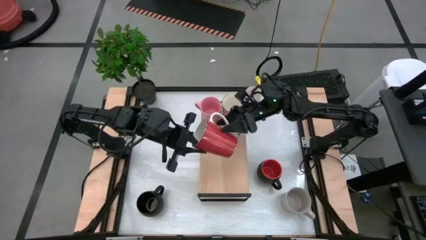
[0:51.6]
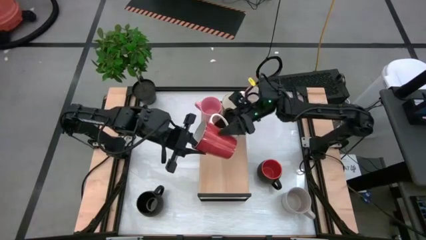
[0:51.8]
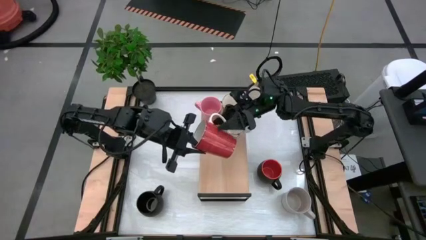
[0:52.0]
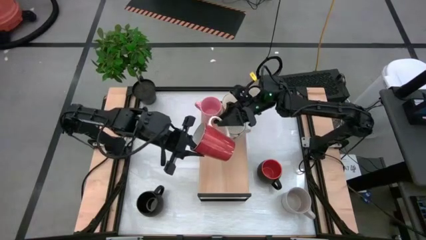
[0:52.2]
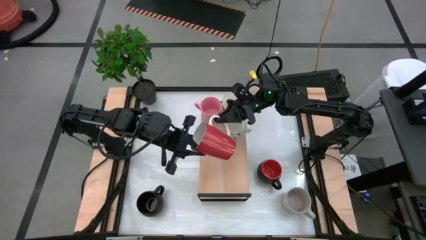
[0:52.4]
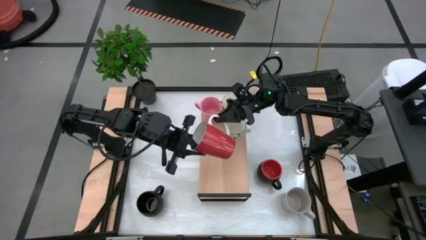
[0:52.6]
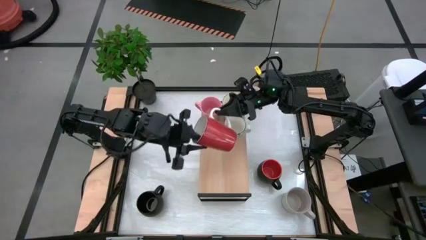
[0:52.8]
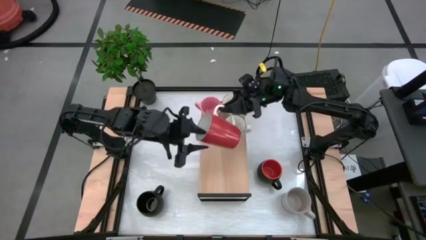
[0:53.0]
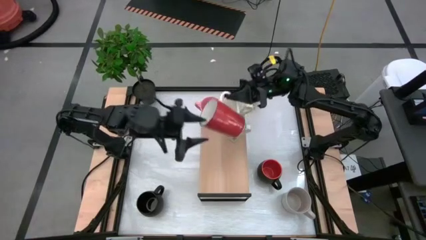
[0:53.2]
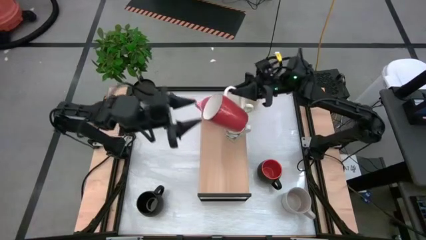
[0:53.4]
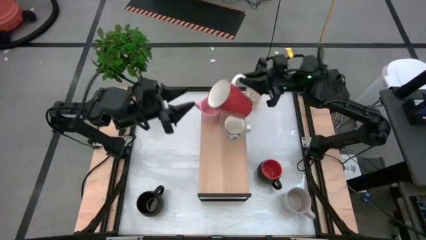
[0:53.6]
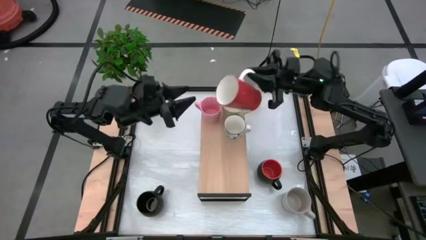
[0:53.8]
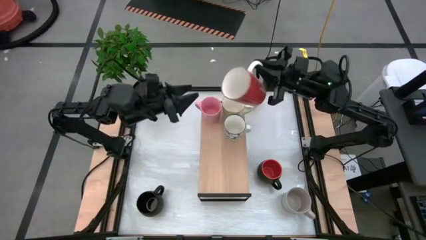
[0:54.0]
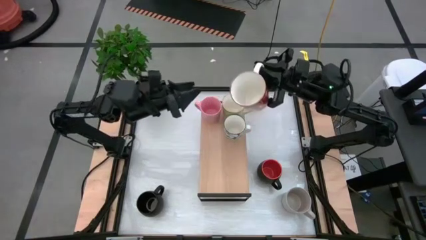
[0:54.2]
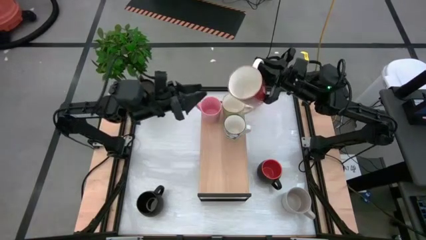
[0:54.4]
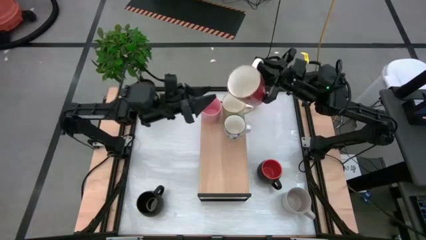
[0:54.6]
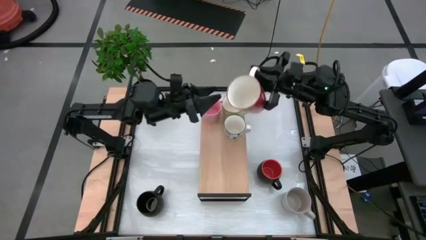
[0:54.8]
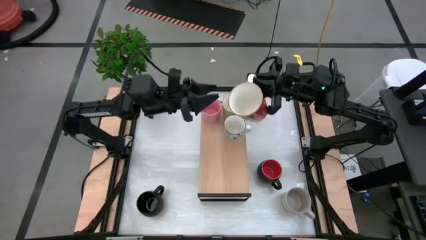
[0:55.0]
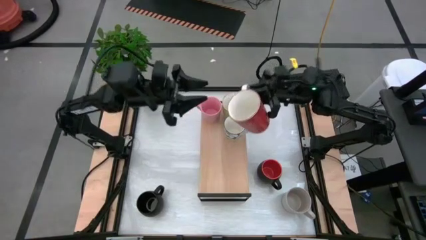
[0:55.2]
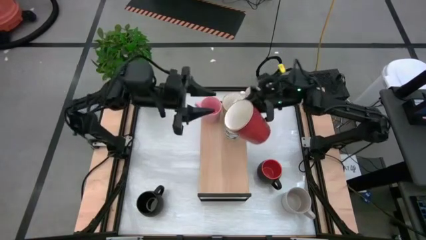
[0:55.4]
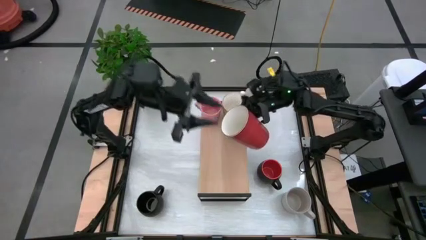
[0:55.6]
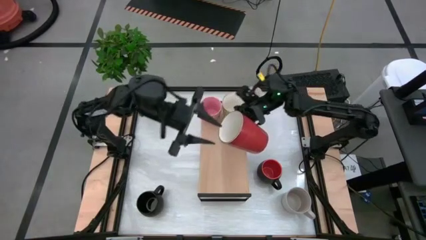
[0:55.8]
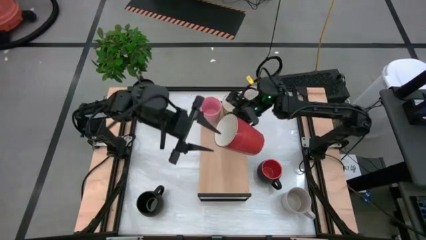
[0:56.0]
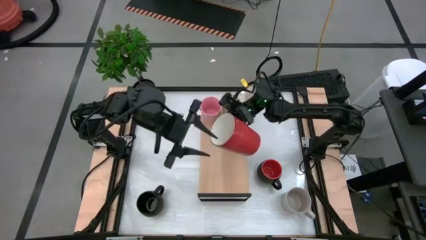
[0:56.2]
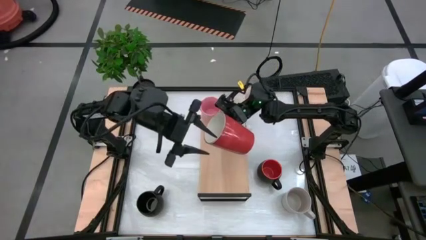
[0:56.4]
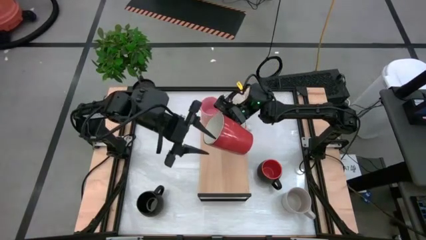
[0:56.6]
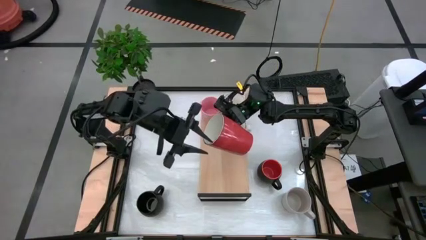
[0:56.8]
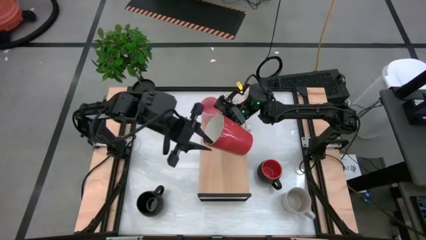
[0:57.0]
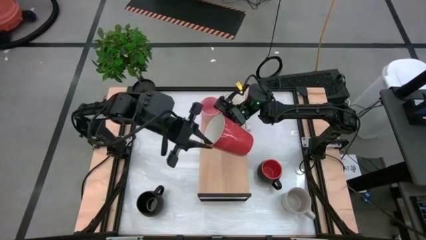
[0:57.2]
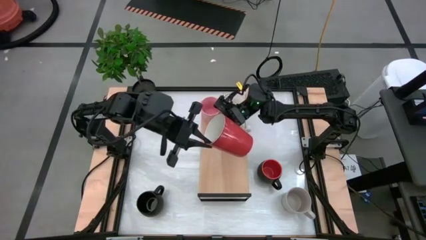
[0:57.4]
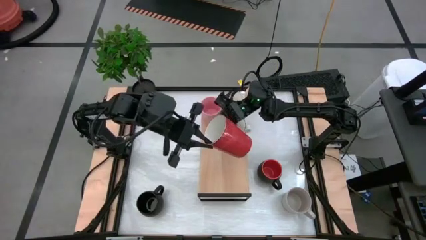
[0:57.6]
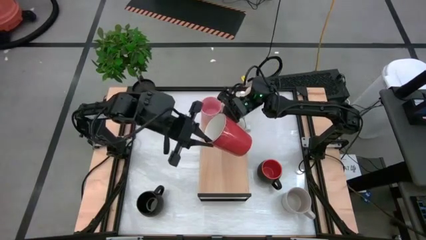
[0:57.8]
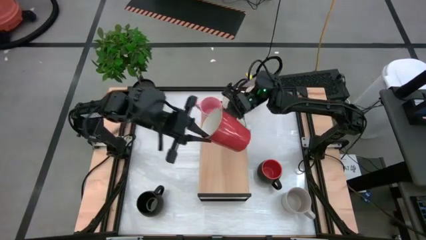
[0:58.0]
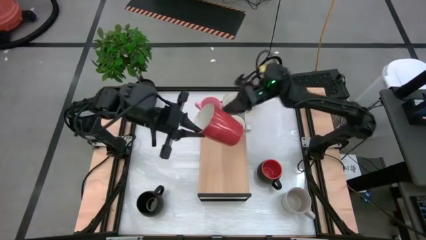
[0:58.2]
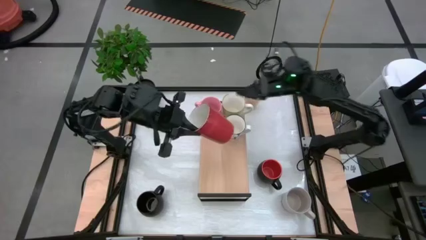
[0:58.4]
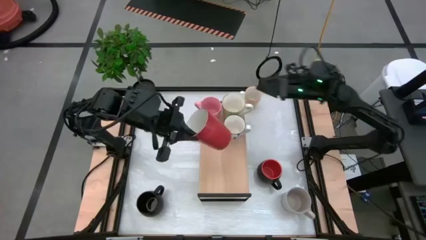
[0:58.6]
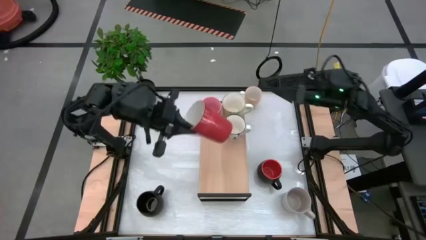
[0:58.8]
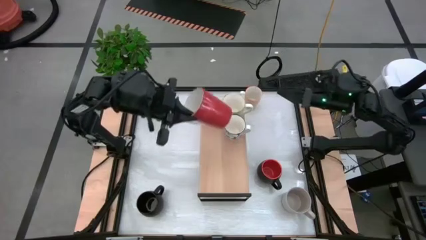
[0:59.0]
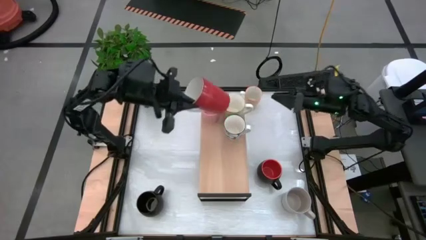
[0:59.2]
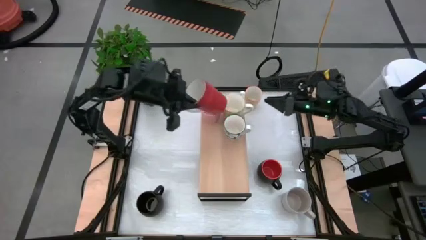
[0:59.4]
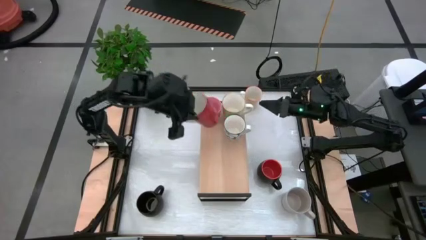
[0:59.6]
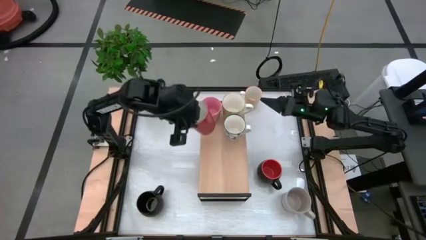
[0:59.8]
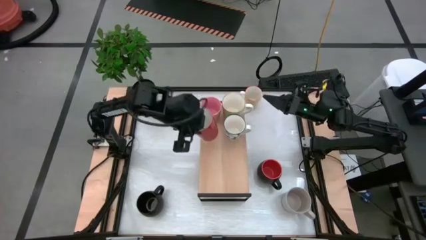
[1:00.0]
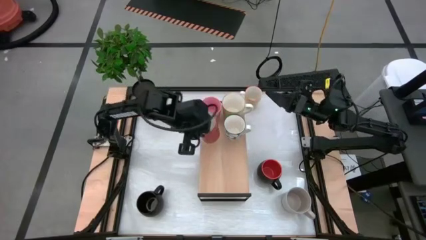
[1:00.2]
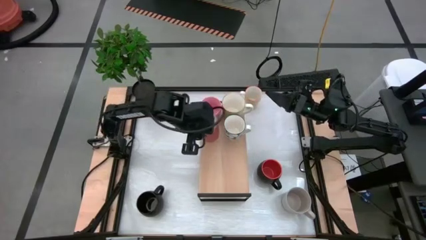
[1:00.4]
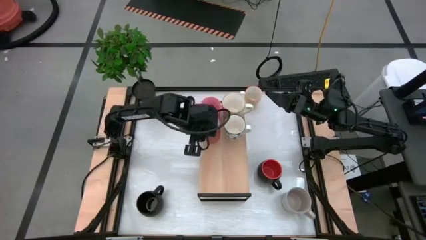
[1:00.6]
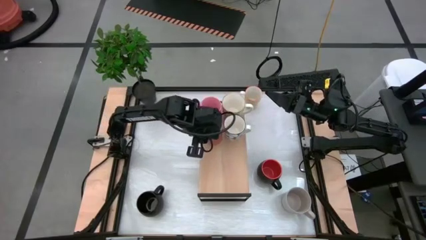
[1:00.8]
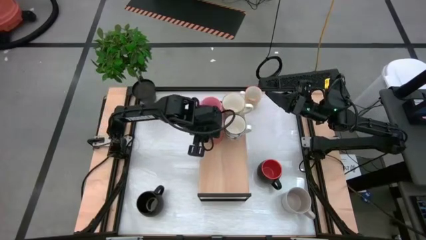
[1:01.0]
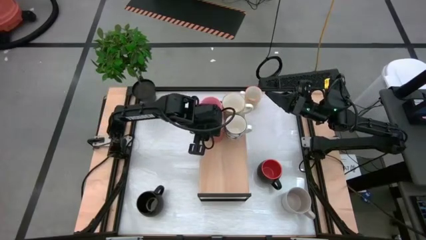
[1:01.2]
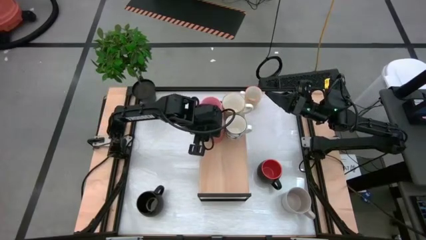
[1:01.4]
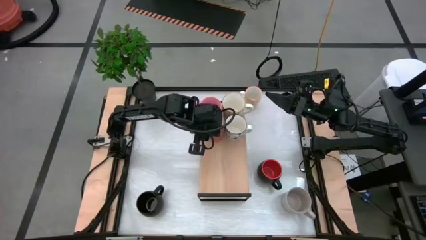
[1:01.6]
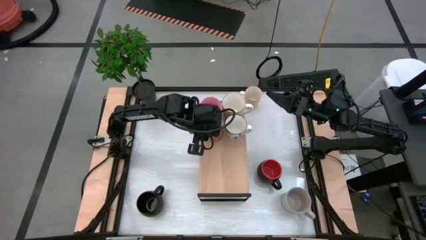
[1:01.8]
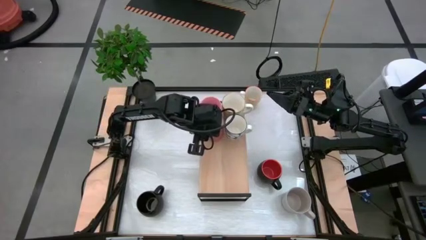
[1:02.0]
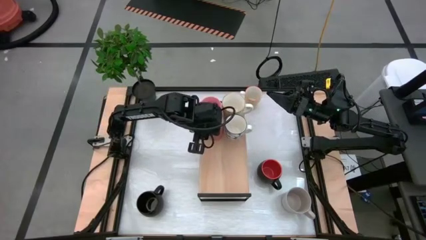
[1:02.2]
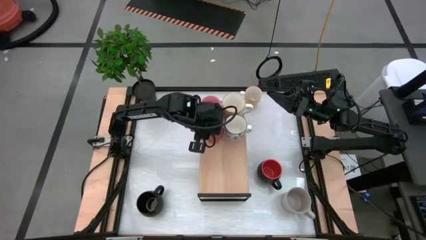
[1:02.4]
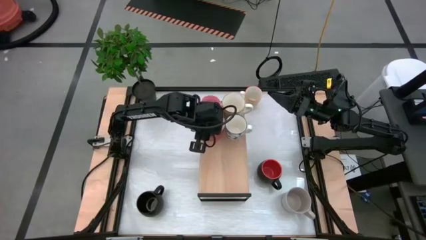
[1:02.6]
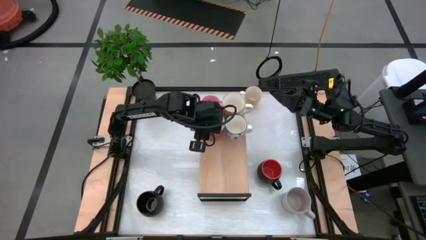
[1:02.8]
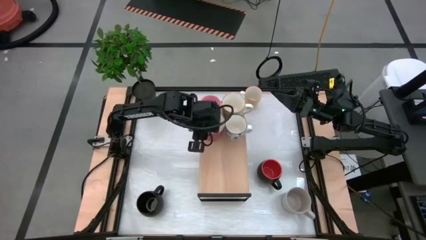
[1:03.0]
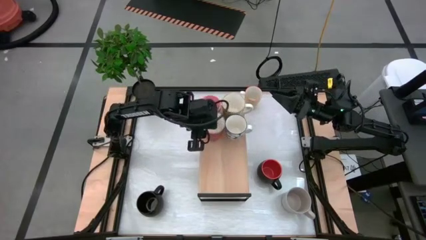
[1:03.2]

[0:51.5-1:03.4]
Task: Place coffee mugs
Put the orange mug on the shelf
